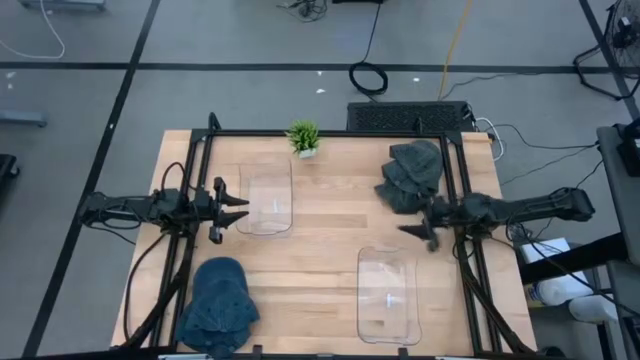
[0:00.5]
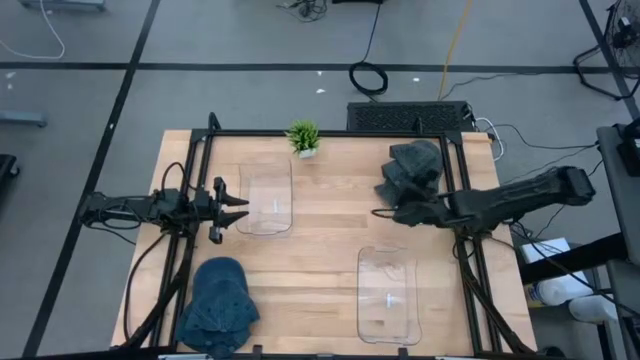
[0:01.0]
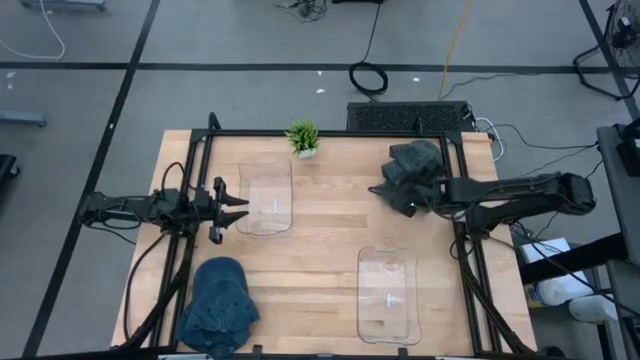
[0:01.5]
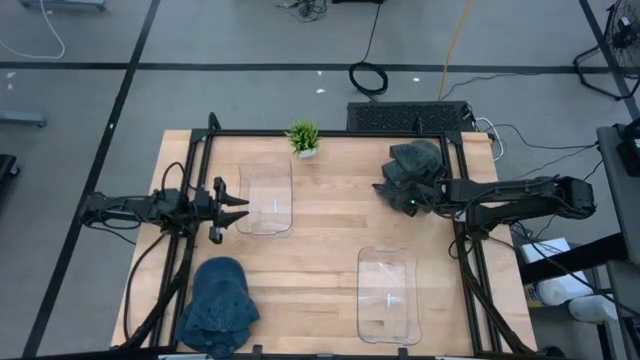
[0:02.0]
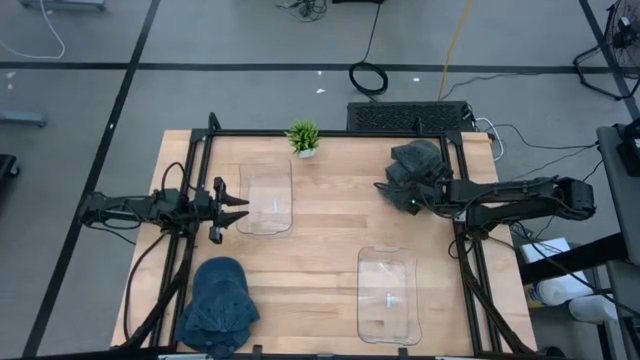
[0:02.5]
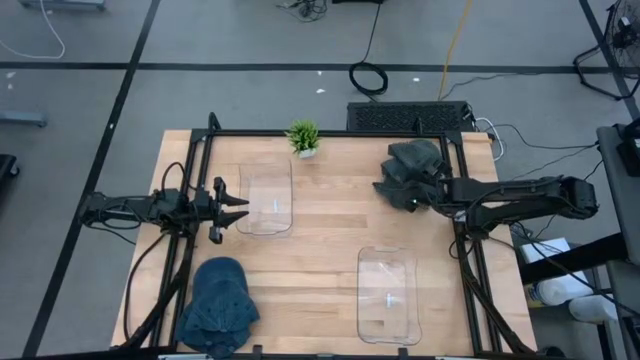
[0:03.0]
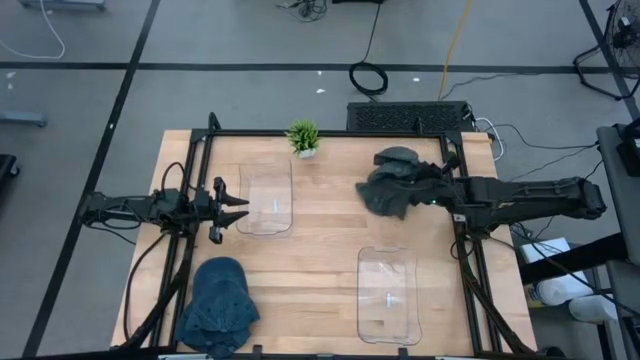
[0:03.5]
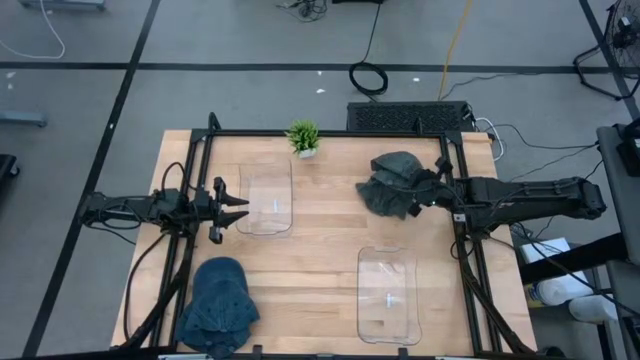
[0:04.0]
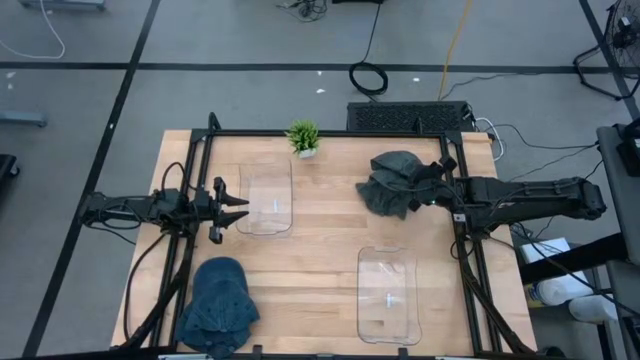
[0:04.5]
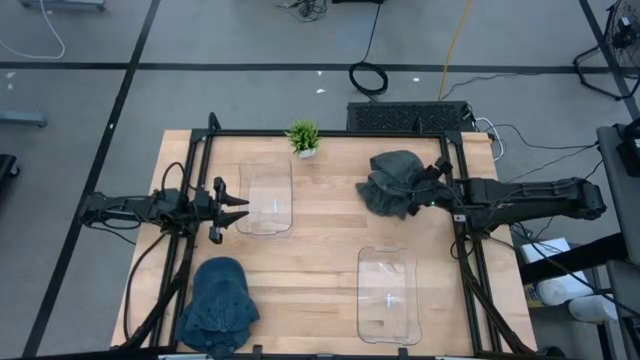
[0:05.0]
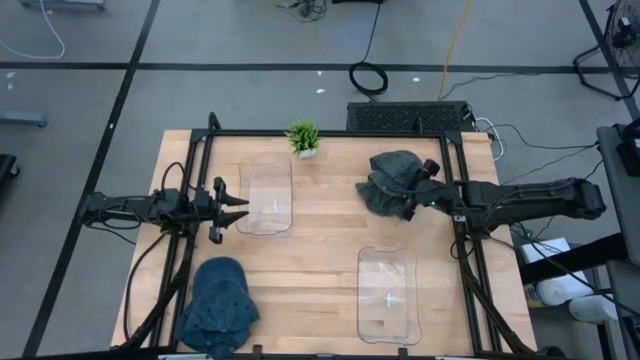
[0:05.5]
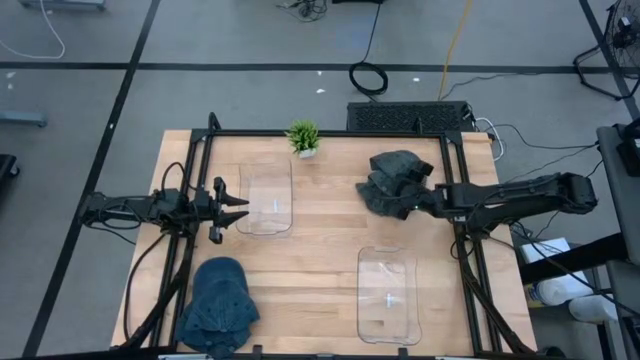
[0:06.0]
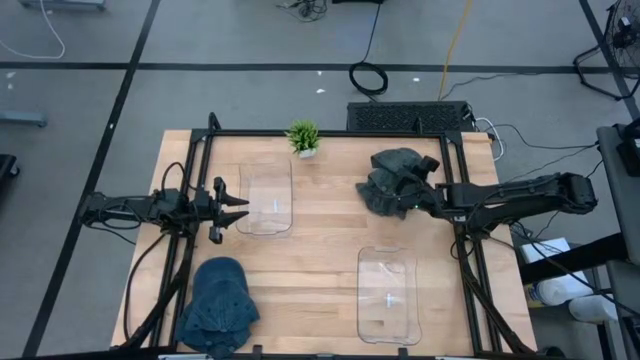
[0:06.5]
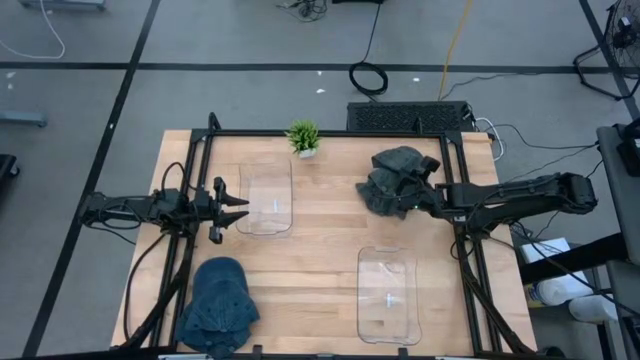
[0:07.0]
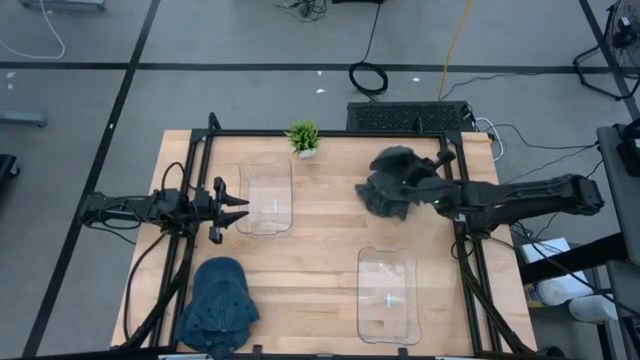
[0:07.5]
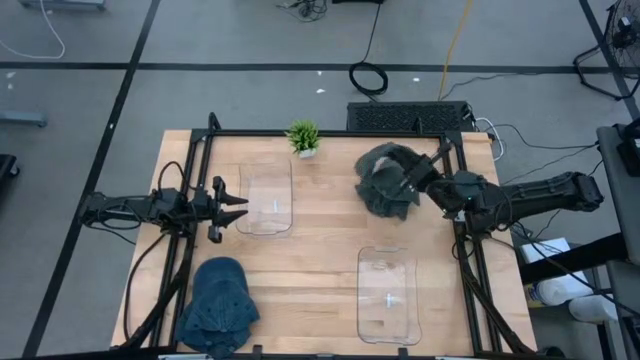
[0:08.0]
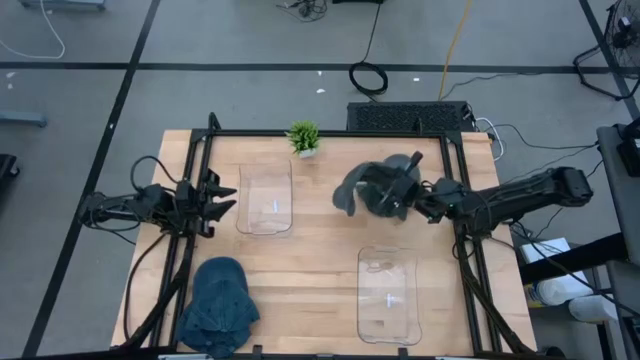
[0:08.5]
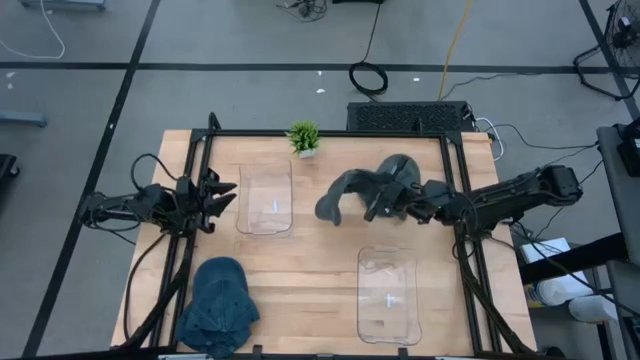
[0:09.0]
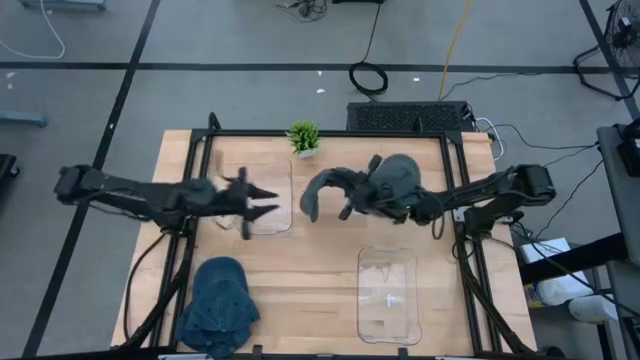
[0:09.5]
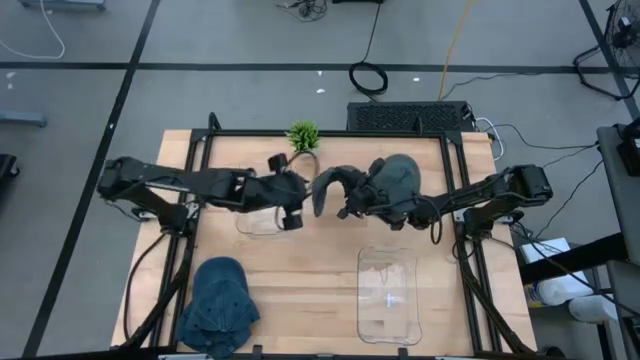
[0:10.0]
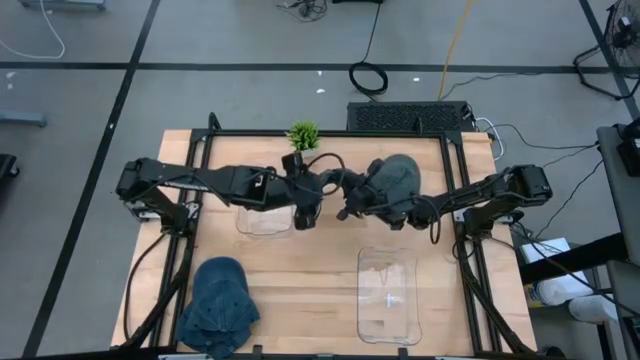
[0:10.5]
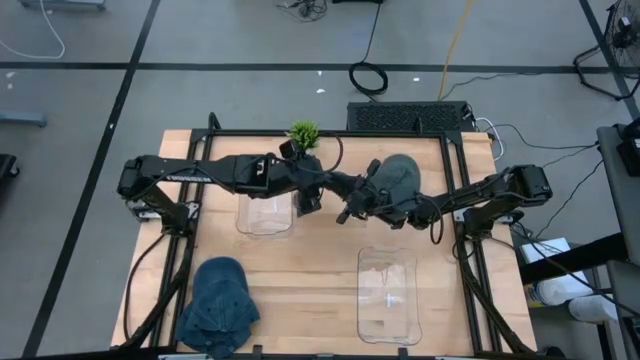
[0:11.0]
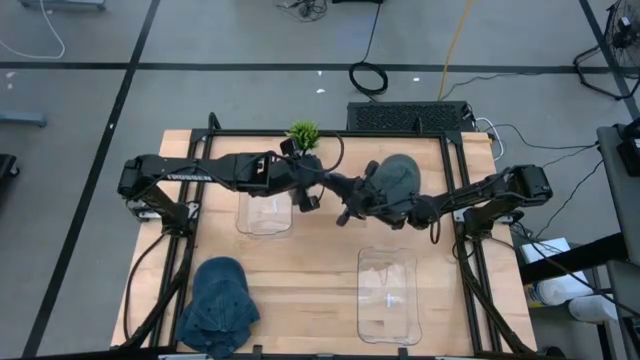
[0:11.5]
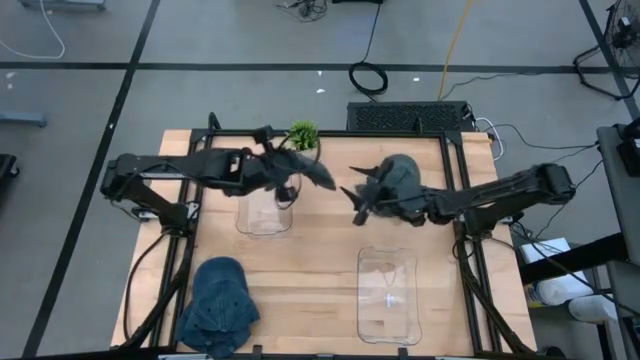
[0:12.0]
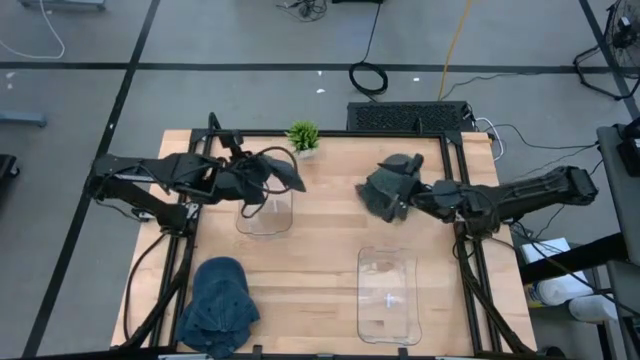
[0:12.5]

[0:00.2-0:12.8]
Task: Pick & Place hat
Put the black cap into the top transparent bin
